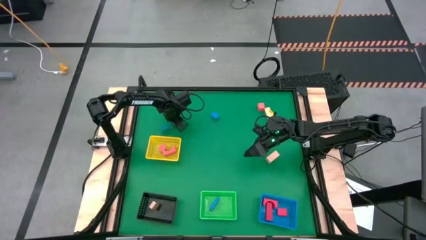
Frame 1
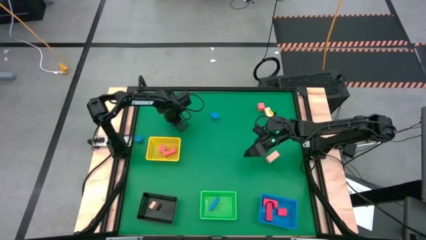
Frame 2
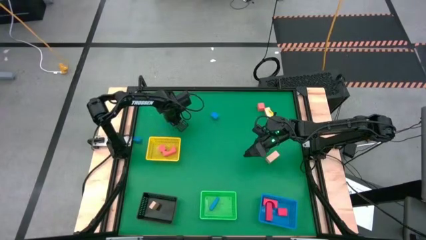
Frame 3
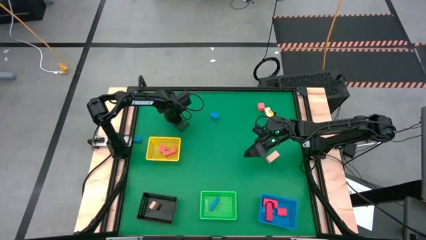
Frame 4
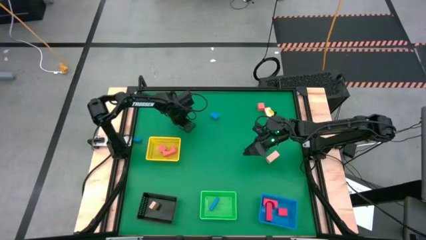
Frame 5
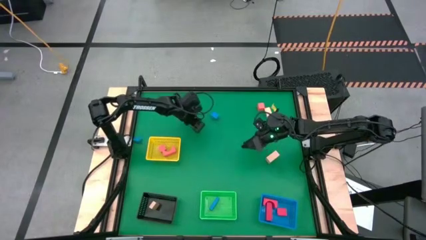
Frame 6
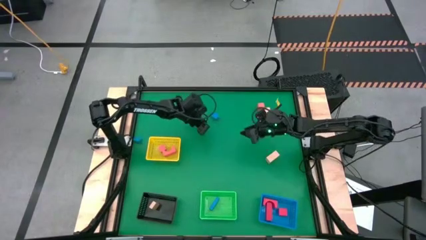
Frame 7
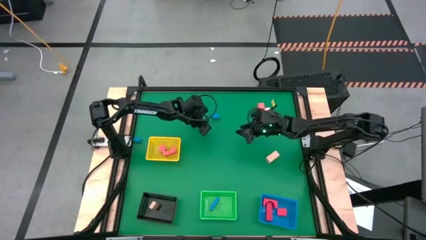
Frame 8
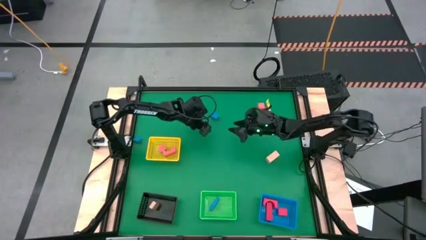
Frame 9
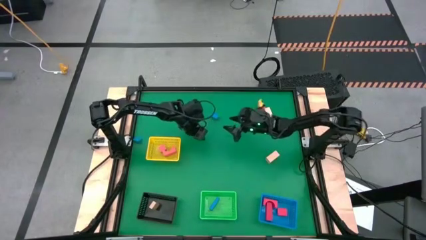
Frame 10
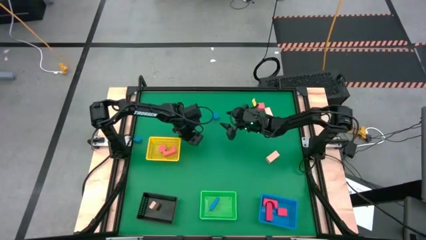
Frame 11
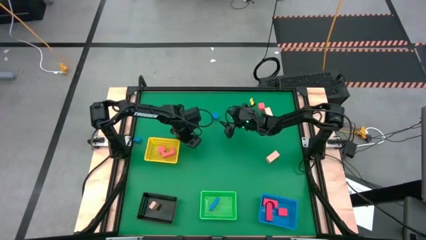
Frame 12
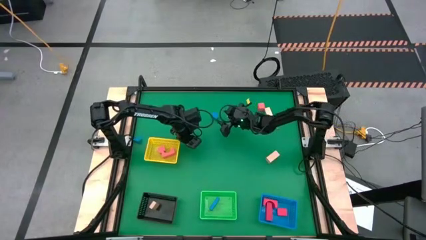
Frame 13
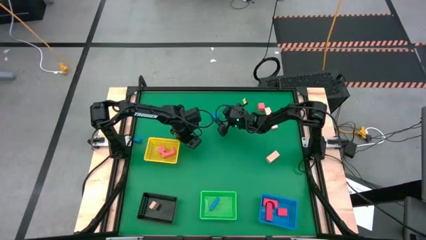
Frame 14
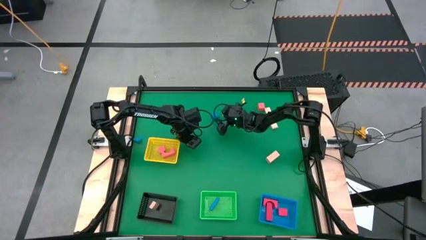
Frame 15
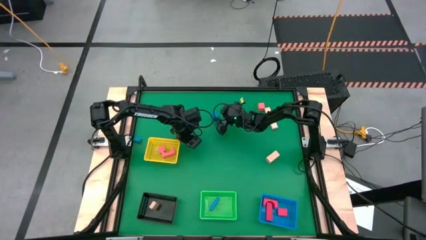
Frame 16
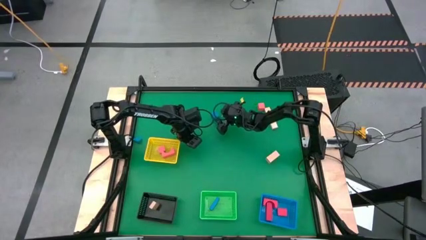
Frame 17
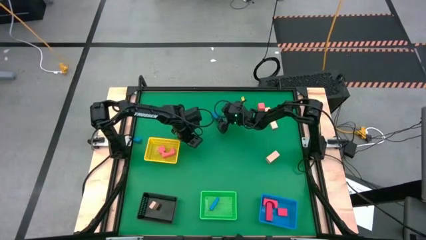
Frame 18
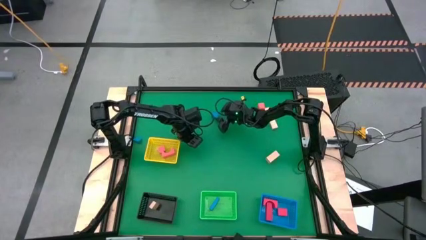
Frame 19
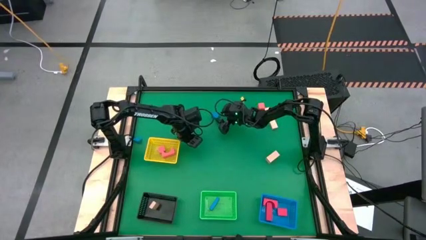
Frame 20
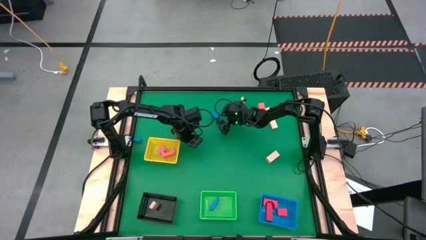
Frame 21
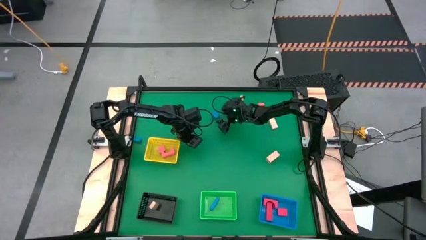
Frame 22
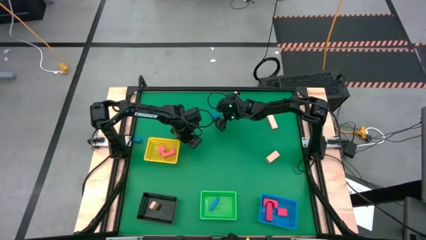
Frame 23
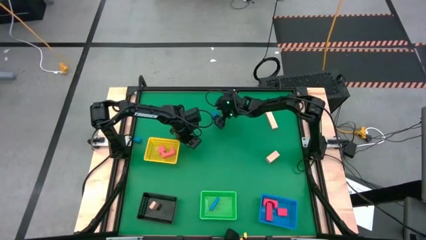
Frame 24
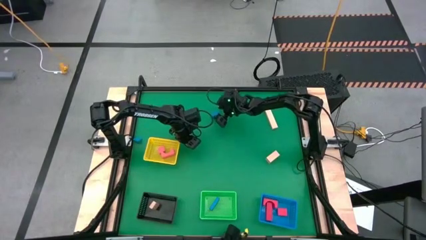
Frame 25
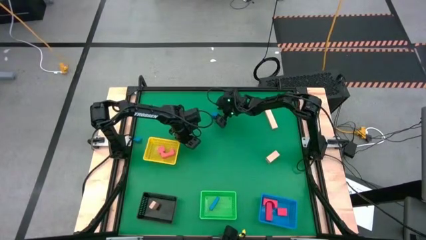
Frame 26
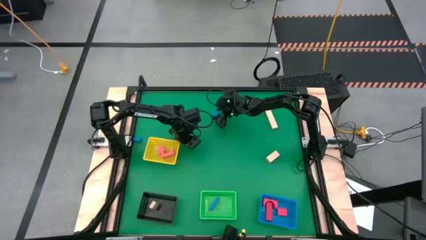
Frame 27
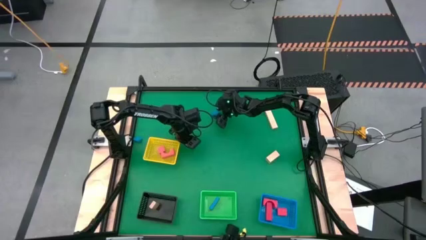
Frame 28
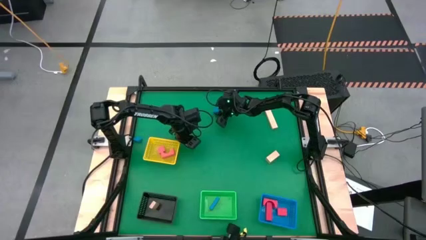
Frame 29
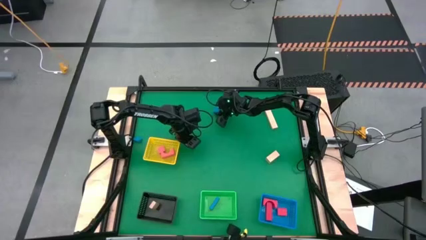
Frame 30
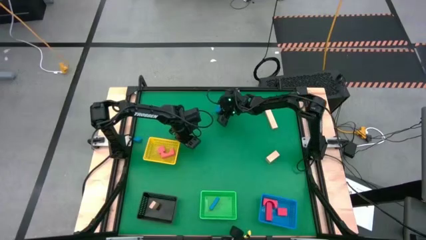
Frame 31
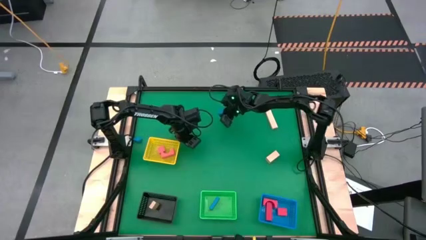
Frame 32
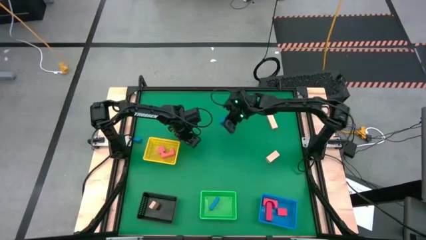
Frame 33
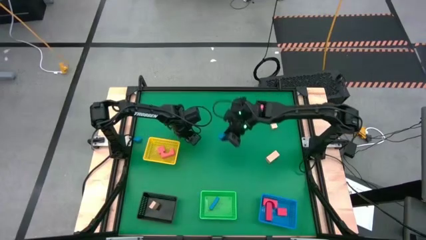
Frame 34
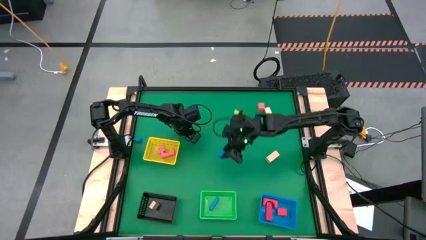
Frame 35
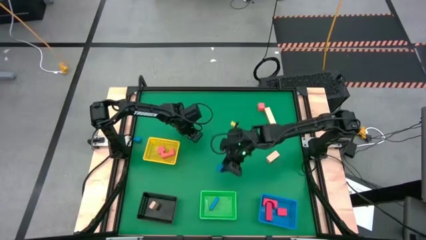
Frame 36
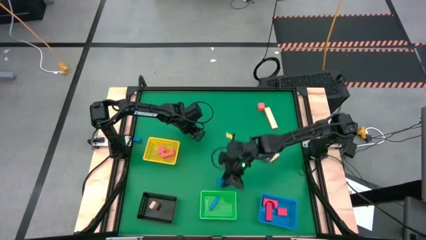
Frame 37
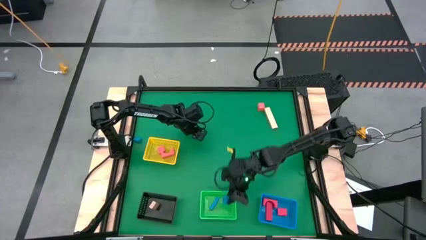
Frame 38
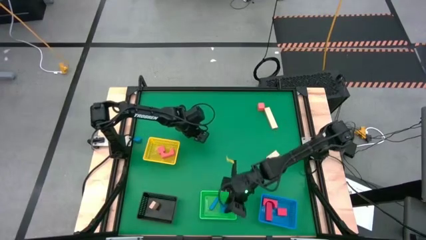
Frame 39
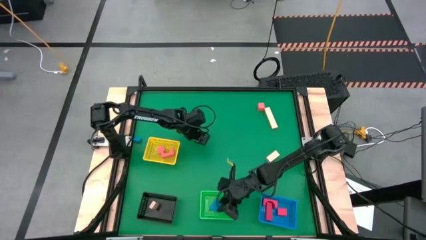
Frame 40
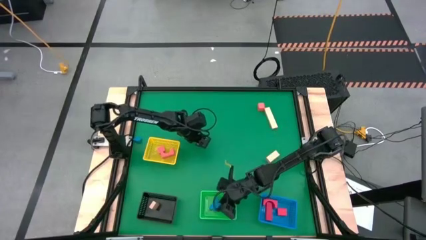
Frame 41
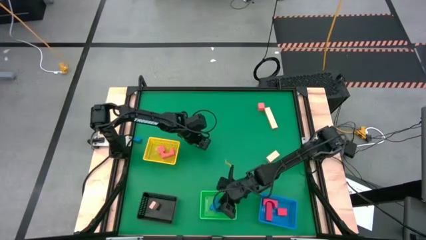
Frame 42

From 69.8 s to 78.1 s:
Task: Sort & place blocks by color
Put the blue half-circle block into the green bin

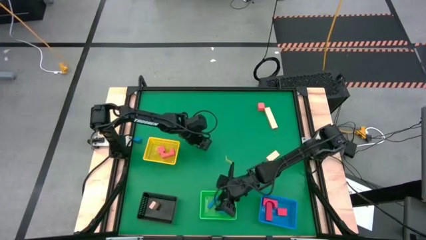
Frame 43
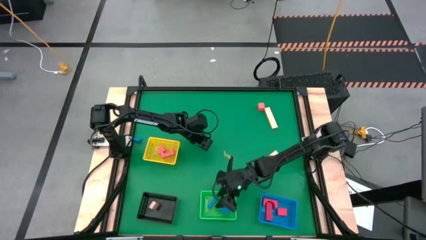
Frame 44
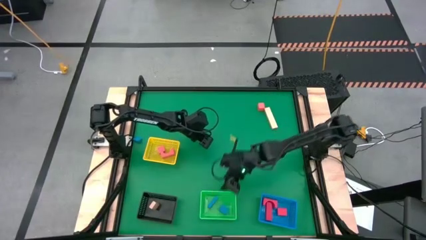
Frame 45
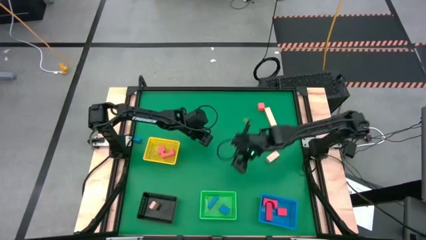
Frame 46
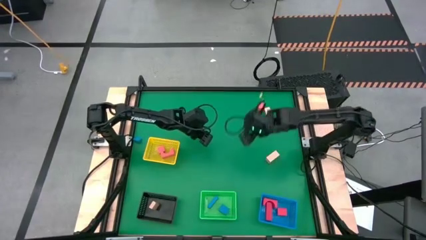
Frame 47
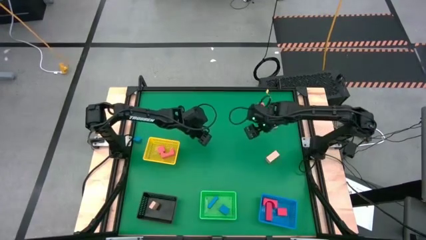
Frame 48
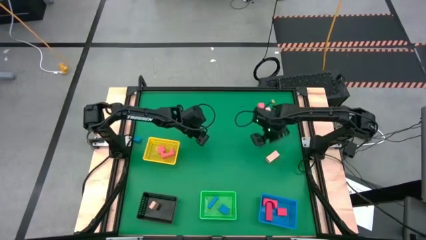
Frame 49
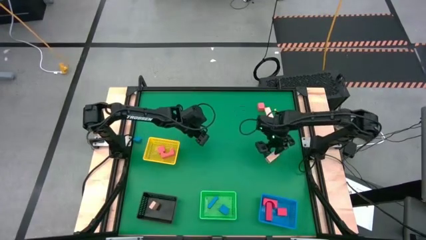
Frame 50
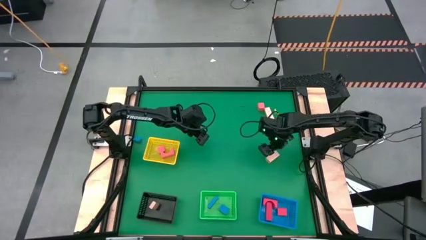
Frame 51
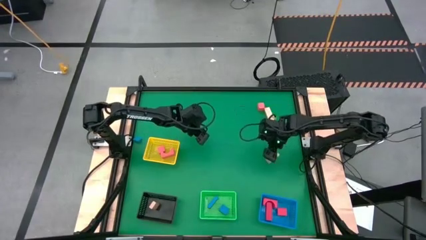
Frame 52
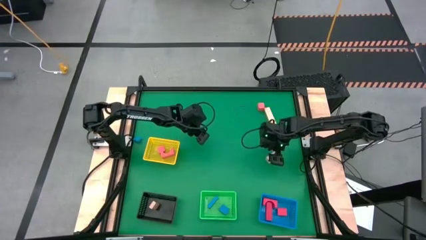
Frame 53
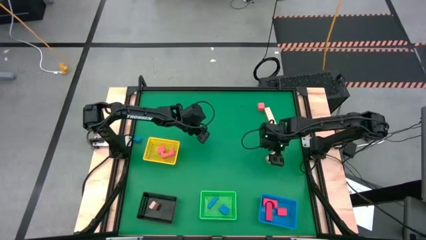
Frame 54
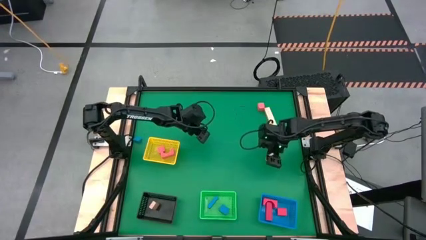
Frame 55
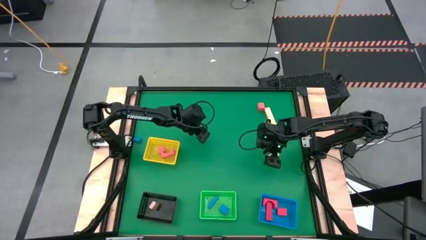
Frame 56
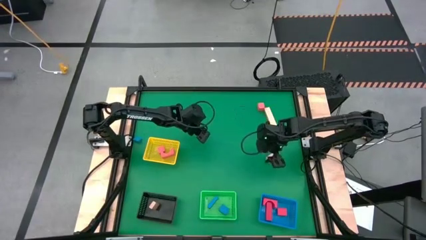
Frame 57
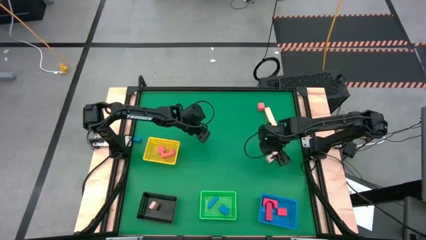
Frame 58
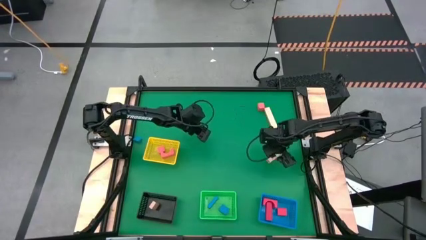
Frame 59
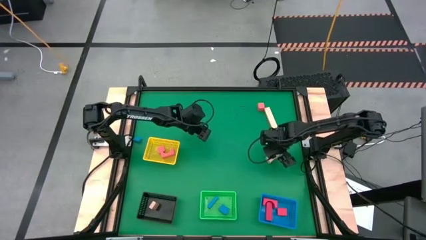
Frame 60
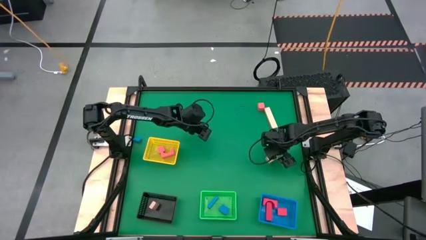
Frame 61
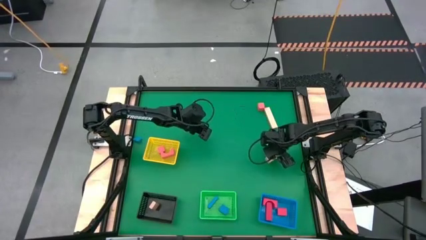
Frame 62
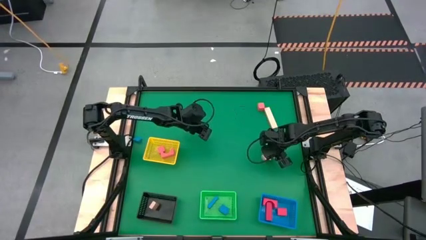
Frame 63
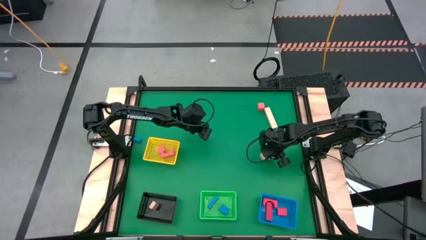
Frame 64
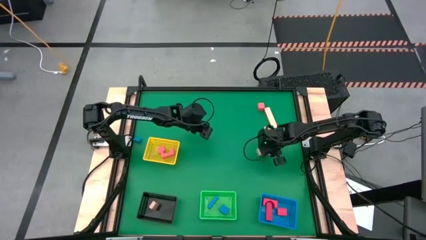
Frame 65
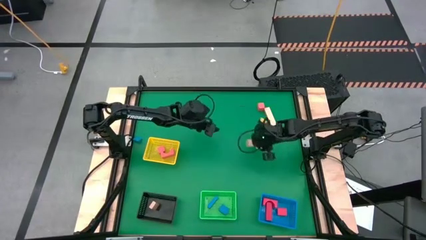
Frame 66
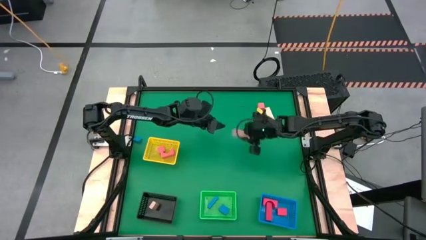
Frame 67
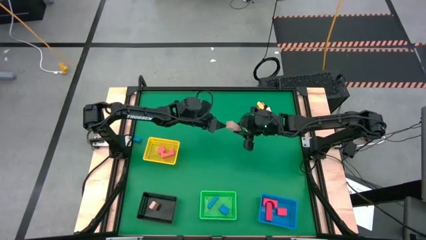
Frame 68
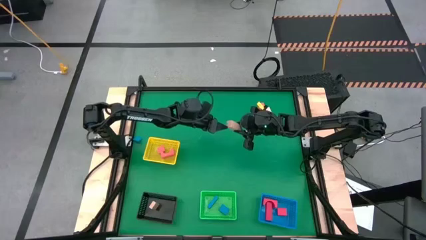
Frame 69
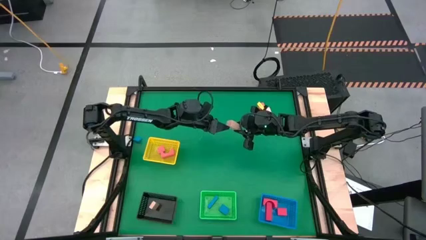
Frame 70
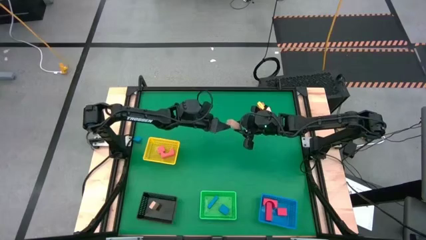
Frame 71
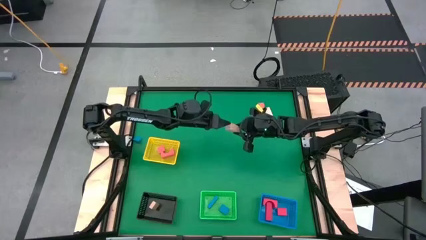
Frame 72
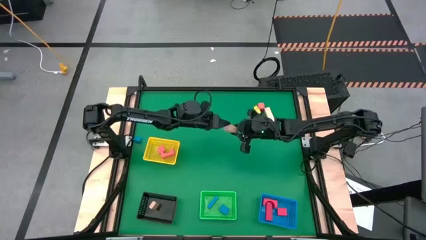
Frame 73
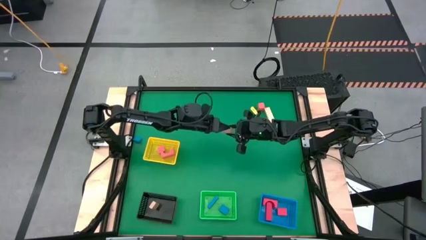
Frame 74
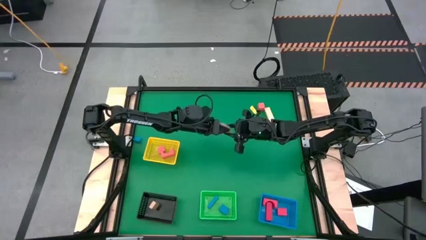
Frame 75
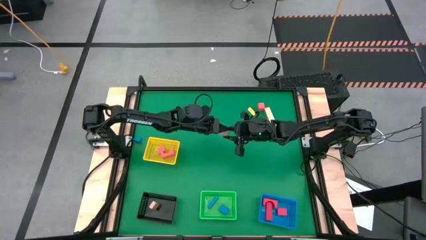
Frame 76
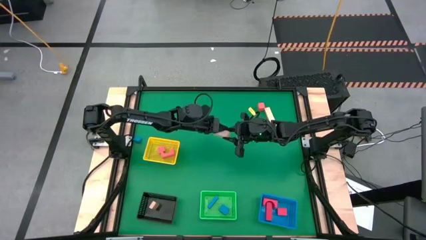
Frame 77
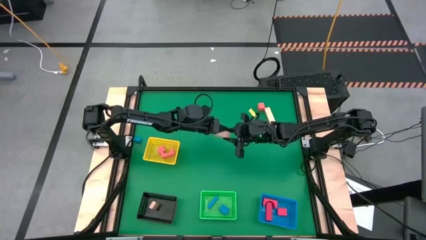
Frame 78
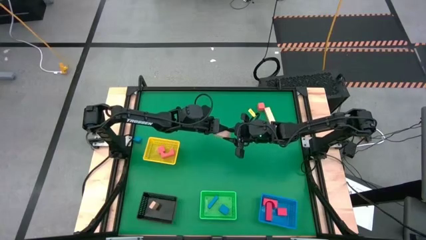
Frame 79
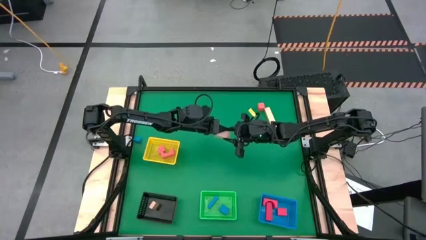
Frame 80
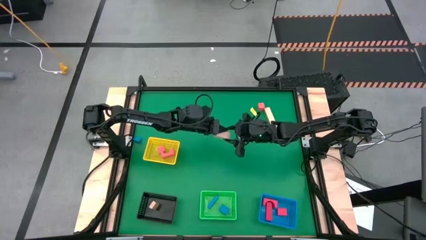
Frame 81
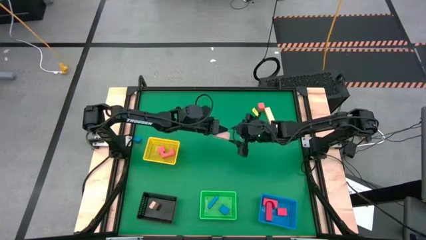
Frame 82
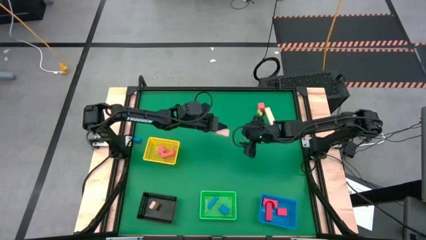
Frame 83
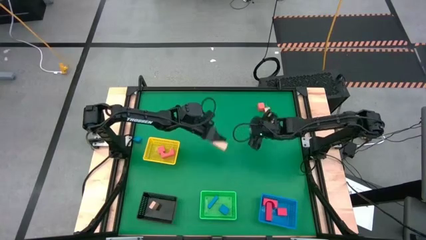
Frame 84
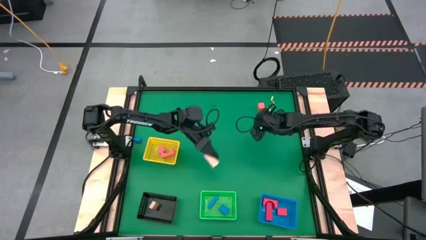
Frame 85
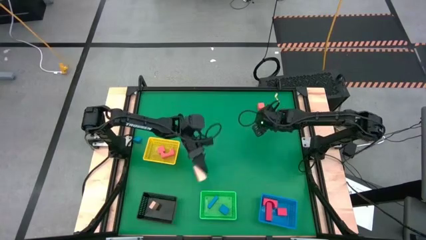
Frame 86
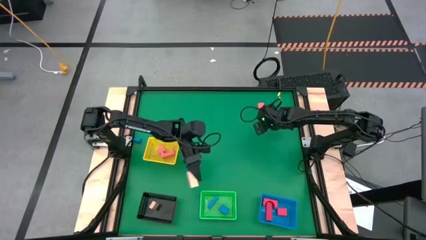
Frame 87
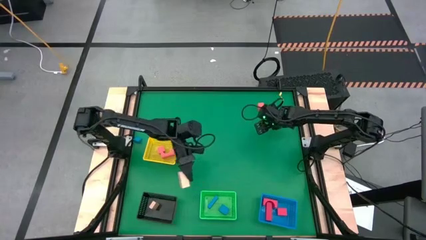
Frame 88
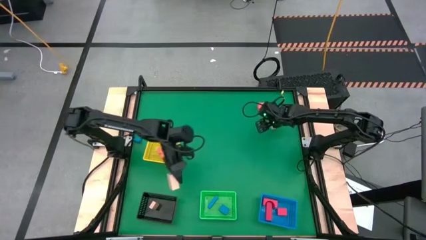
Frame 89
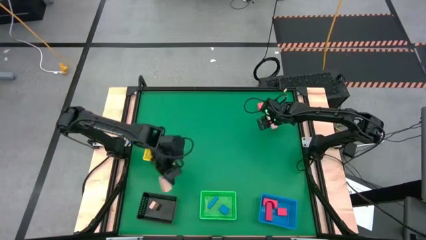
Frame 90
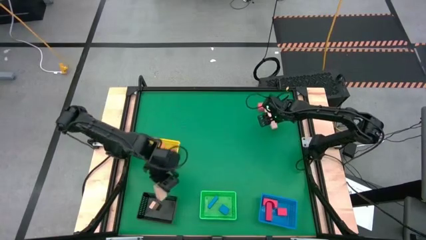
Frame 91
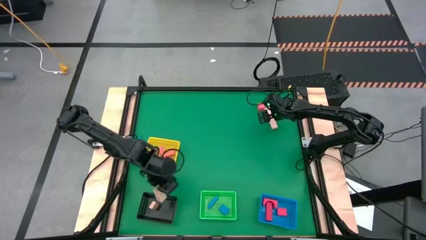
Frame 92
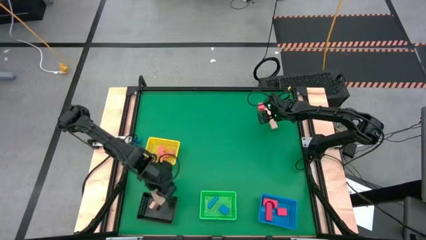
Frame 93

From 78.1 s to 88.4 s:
Put the medium white rectangular block into the black bin
